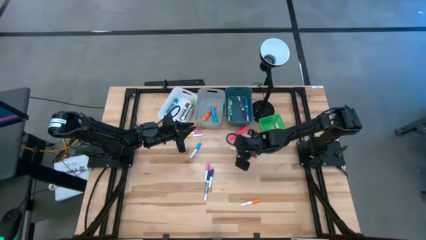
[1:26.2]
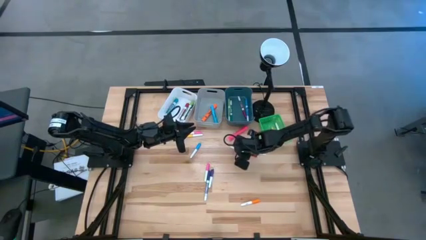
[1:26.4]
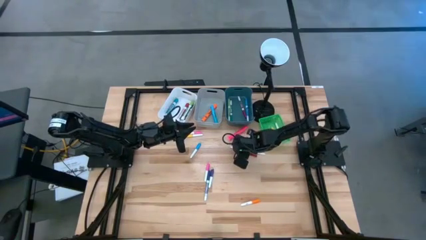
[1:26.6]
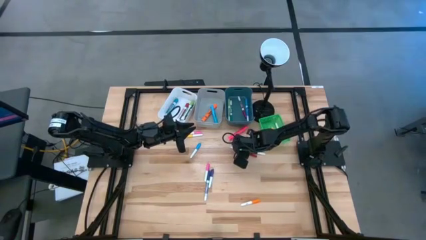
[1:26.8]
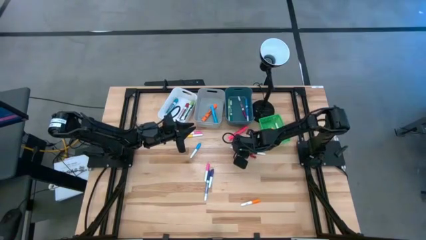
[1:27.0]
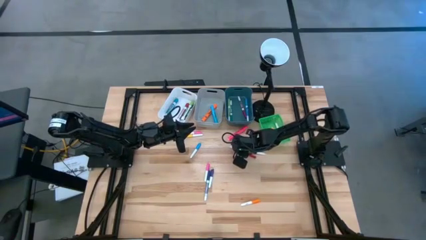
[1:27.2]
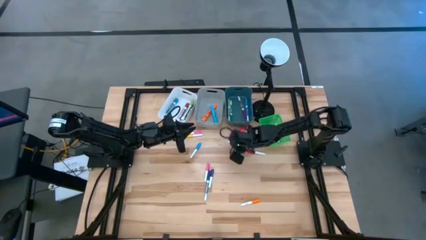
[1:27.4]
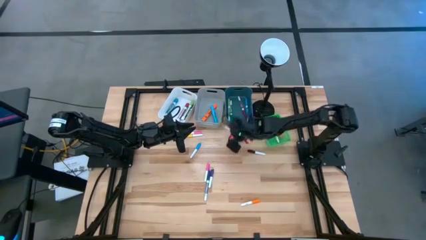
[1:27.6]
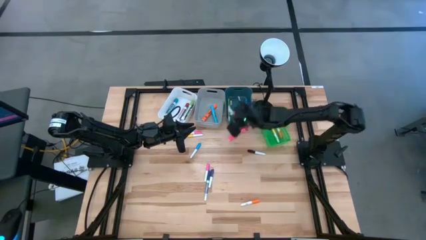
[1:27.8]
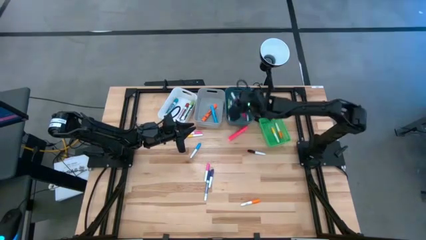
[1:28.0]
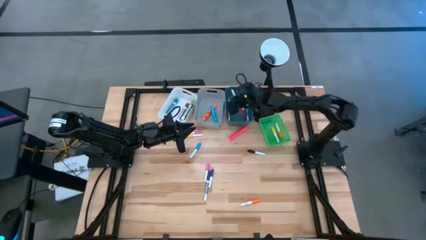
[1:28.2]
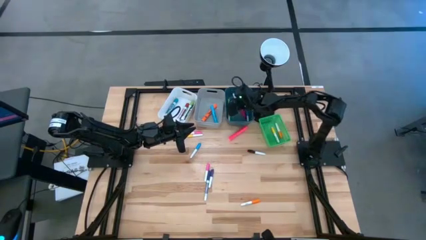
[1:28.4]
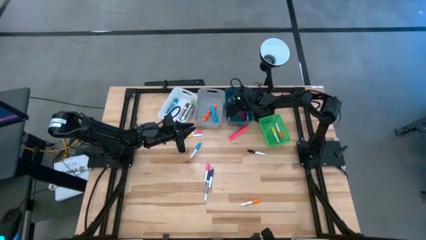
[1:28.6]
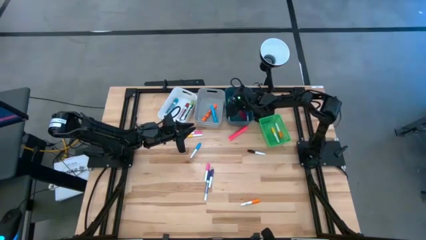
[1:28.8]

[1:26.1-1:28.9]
Task: Pick & Place Markers
Put the red marker pen into the blue bin

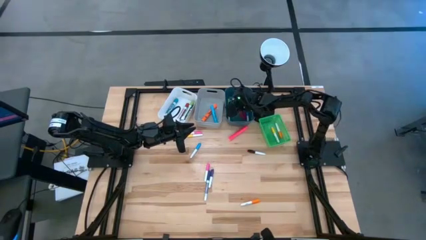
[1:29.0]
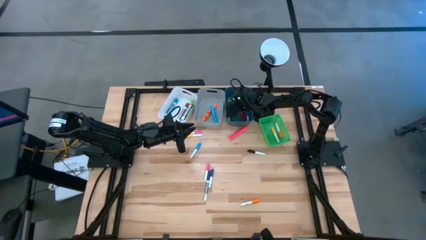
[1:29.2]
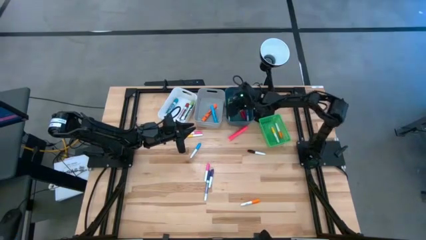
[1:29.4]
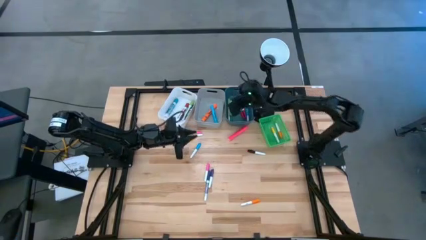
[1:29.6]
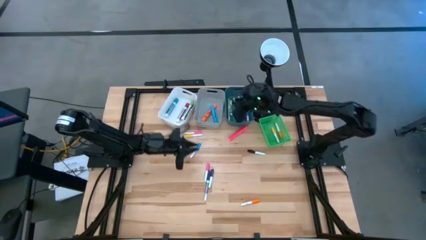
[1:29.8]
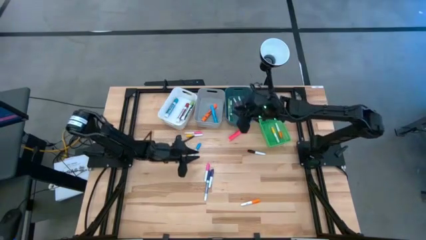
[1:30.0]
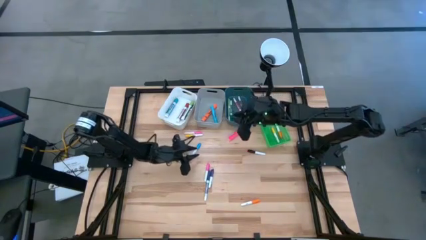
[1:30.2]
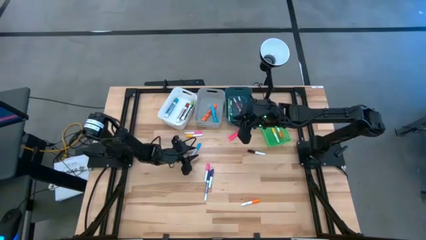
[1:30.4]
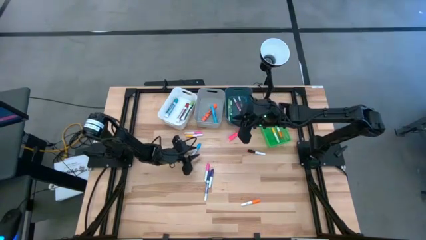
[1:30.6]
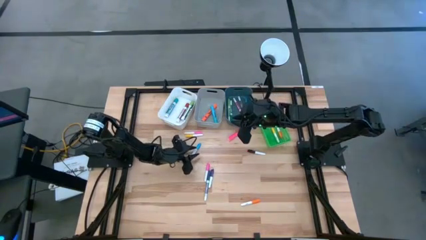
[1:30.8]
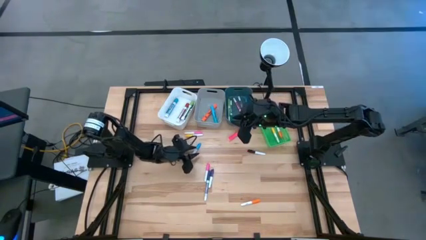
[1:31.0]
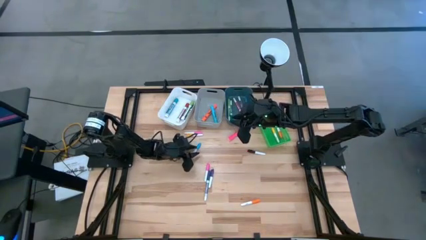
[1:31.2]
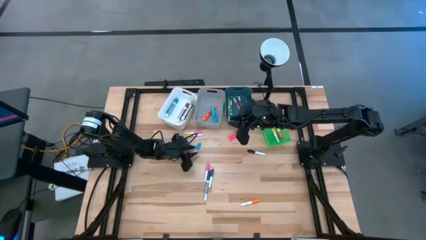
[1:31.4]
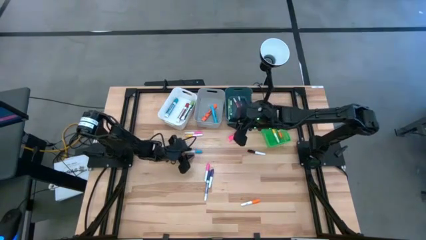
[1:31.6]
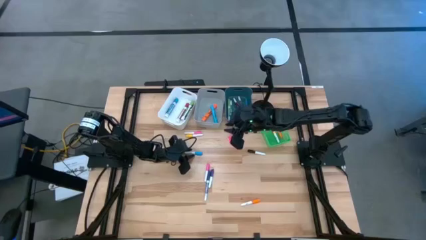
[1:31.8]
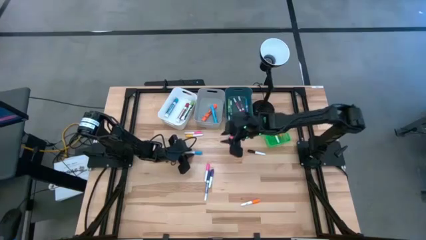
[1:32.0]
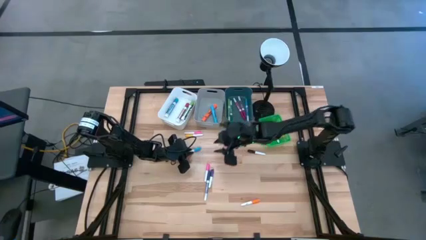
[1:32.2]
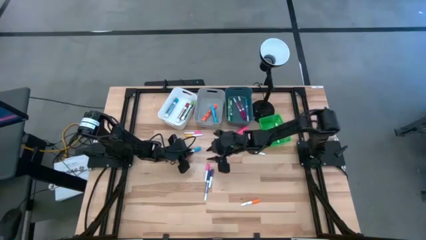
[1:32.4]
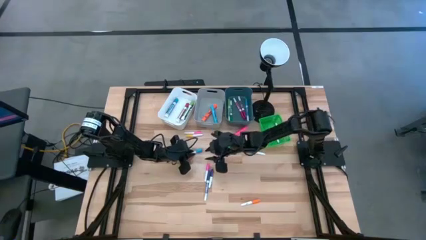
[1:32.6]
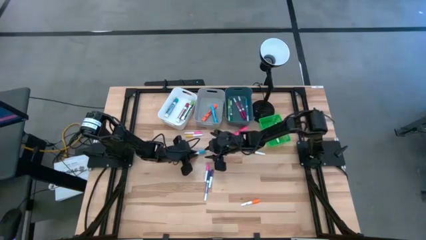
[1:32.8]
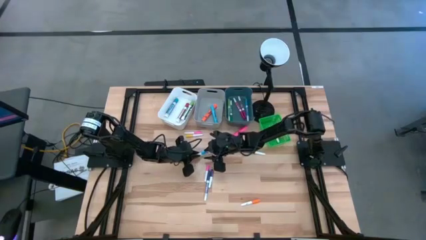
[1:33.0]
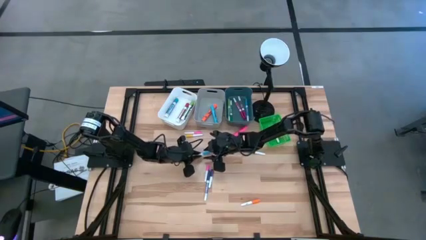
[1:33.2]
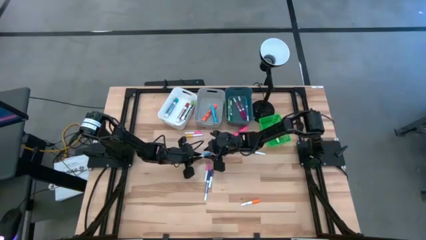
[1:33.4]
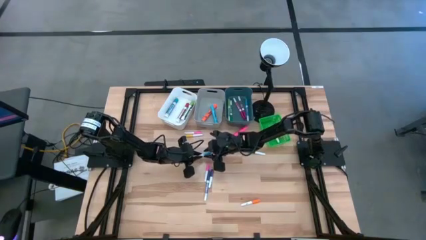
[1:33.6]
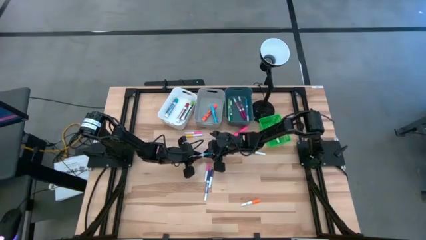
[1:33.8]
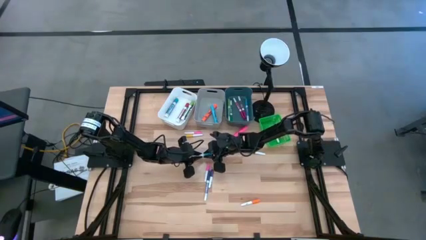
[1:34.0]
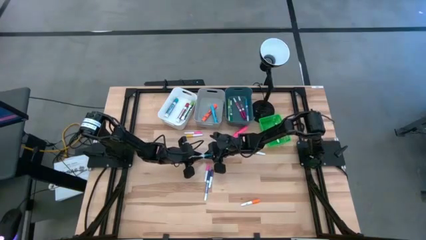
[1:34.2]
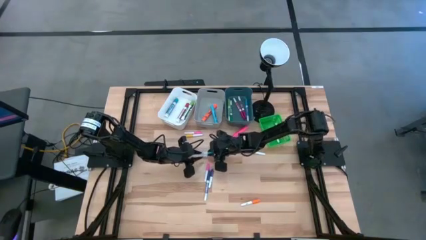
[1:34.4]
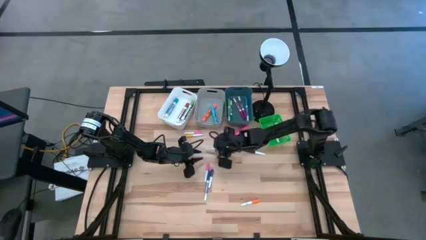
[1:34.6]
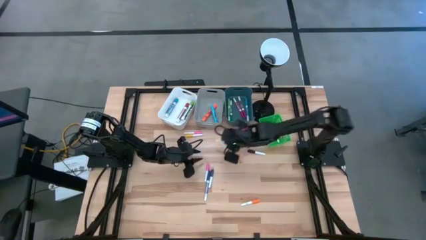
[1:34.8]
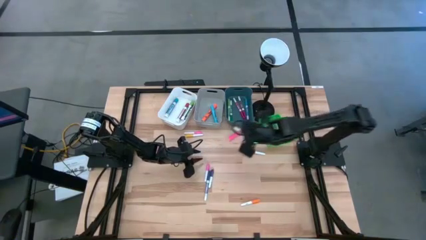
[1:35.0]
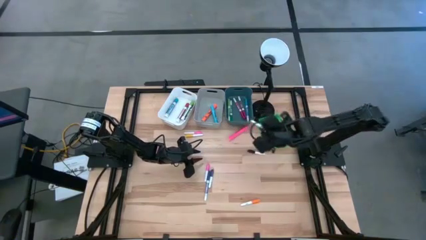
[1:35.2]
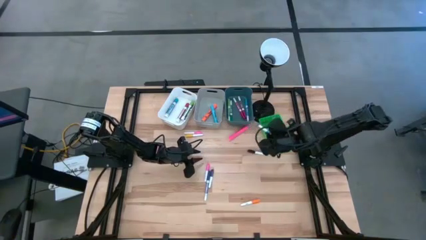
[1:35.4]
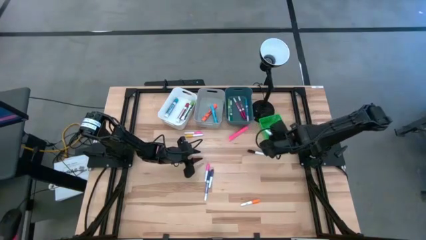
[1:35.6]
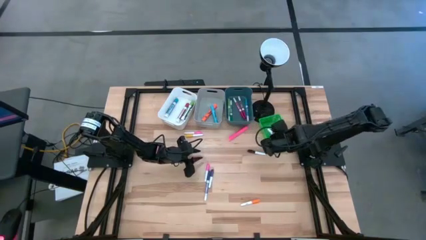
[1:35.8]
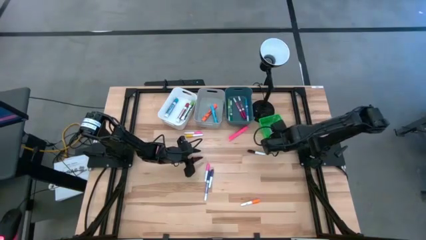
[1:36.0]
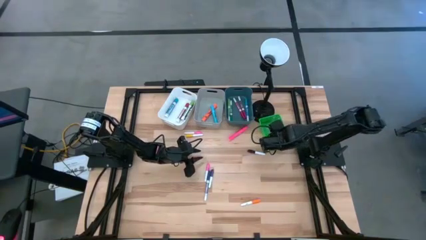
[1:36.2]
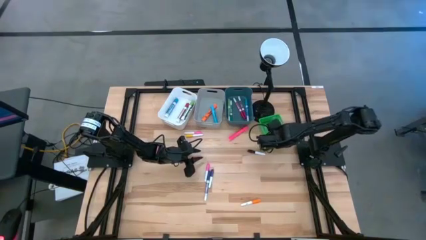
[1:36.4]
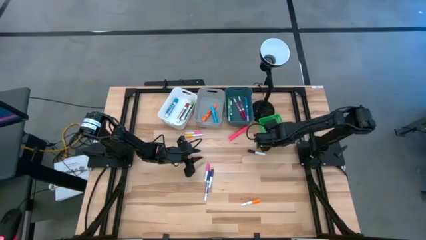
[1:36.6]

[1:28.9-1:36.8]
Put the blue highlighter pen into the green bin

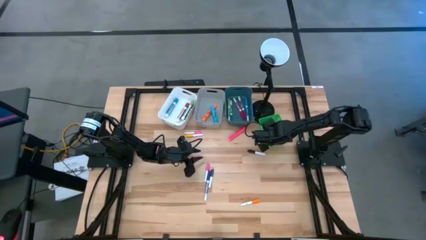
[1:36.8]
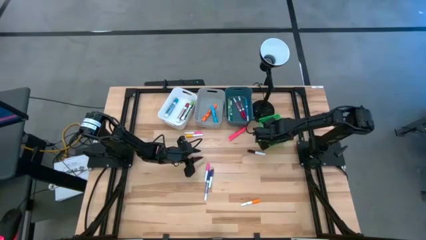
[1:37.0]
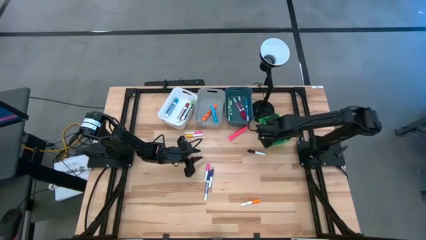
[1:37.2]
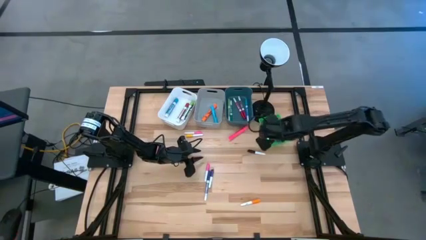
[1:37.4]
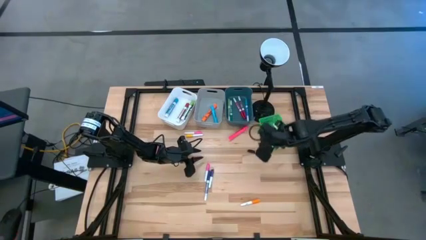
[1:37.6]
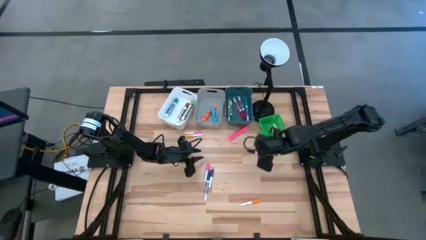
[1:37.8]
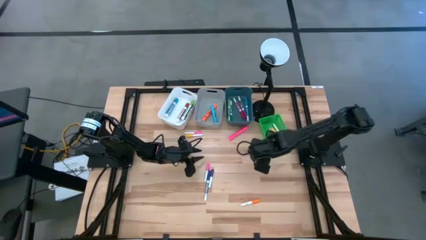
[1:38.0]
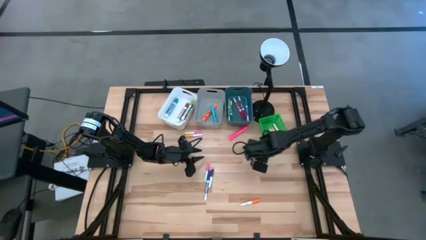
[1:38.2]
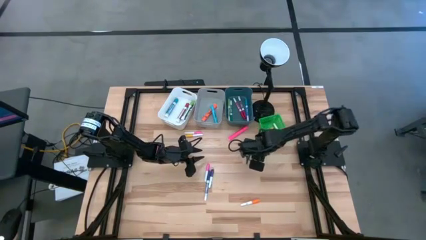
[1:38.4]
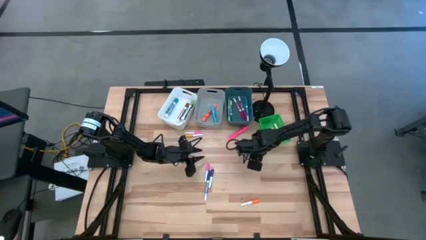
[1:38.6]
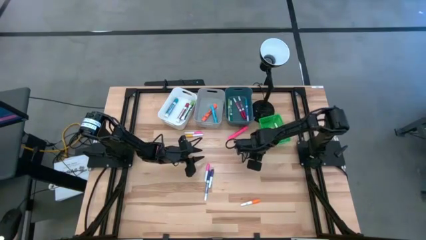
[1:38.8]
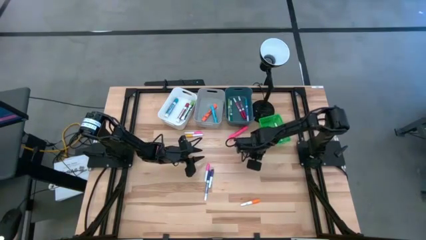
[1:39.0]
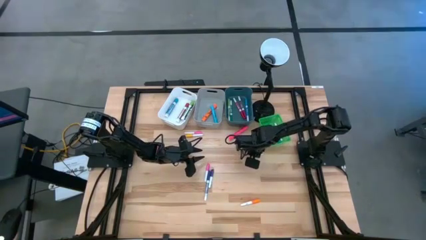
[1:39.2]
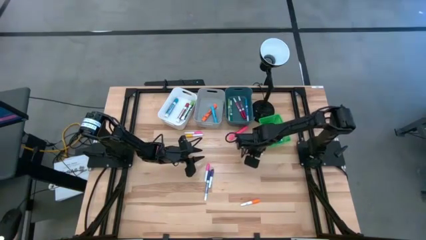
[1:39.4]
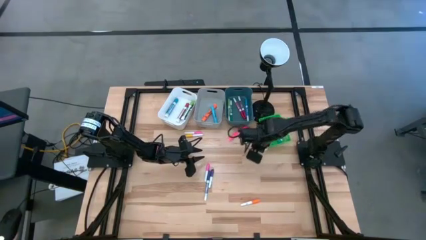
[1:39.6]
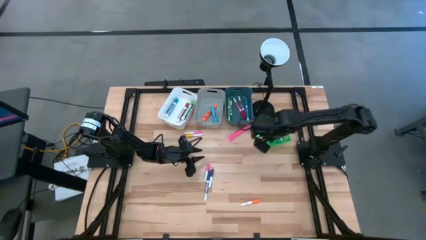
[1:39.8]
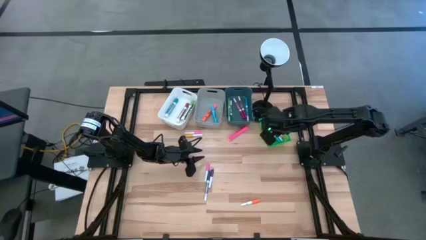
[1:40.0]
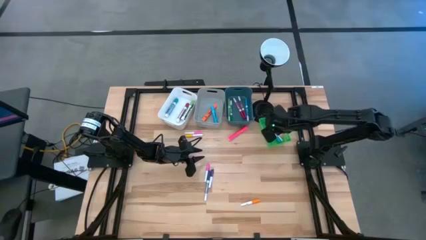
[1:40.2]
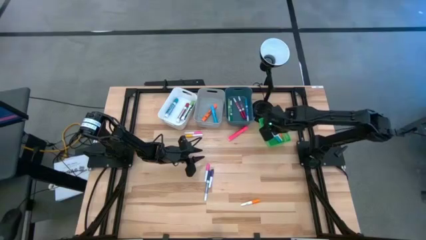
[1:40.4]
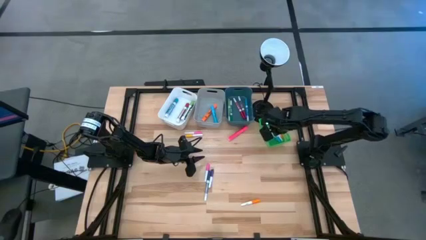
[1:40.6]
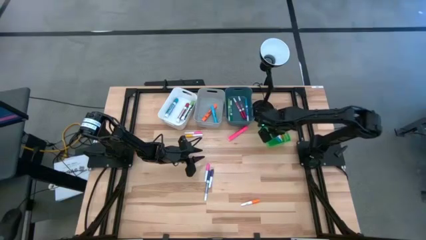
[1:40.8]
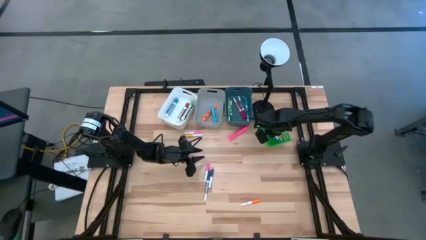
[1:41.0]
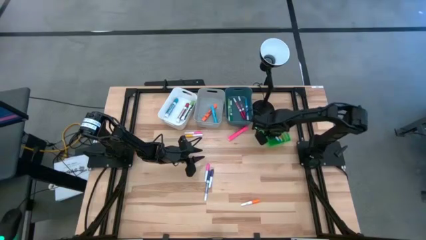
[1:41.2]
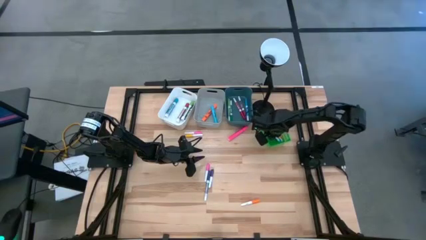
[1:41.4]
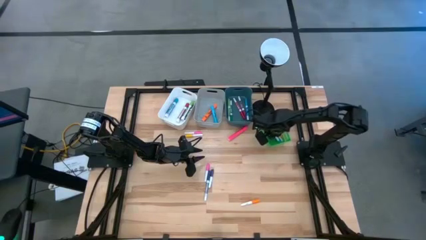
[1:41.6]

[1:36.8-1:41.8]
Put the black highlighter pen into the green bin
